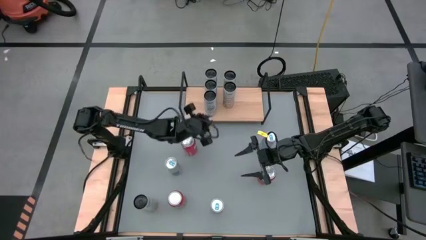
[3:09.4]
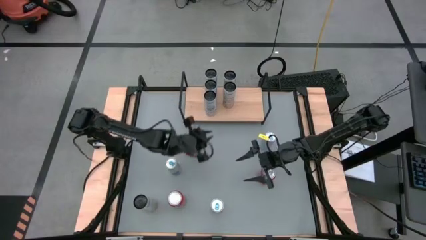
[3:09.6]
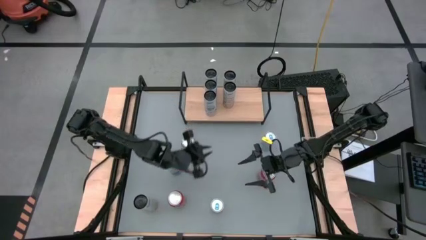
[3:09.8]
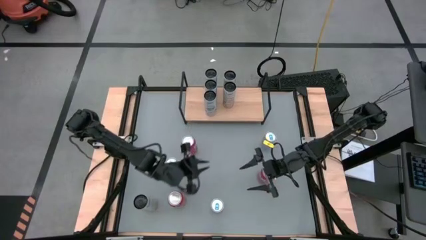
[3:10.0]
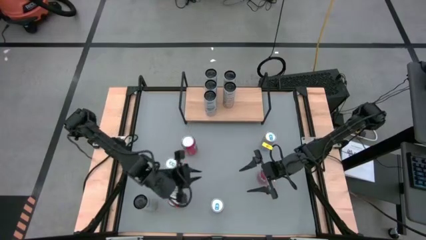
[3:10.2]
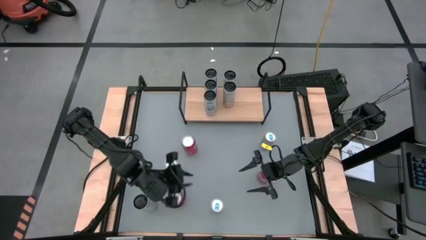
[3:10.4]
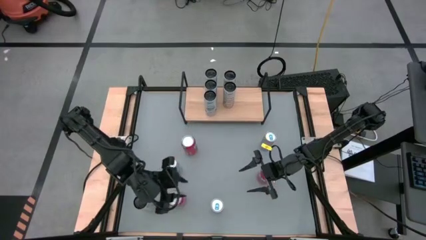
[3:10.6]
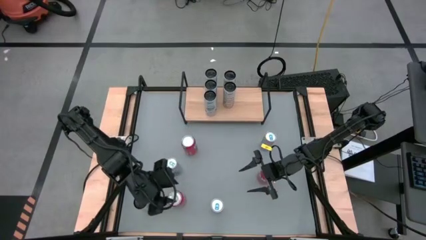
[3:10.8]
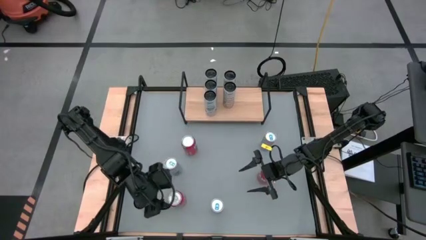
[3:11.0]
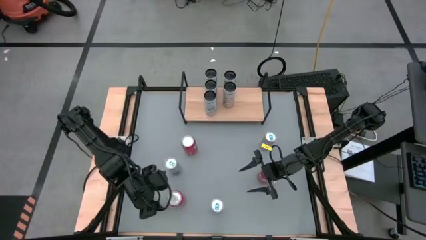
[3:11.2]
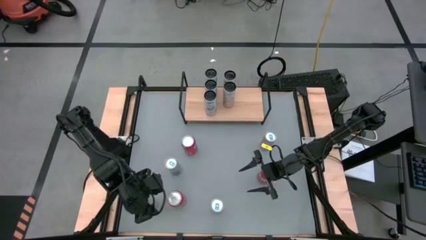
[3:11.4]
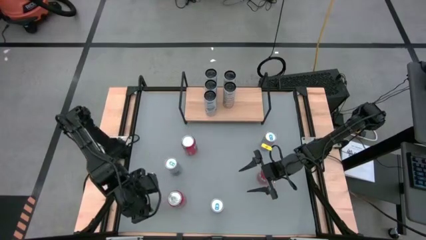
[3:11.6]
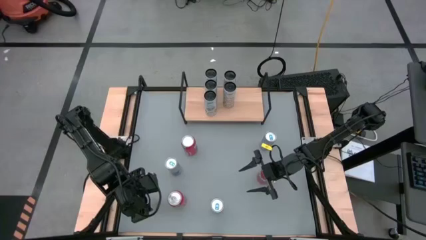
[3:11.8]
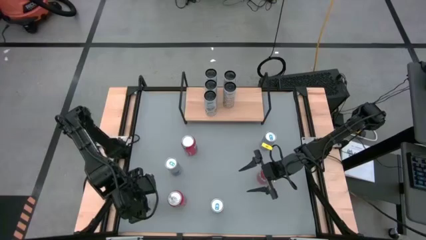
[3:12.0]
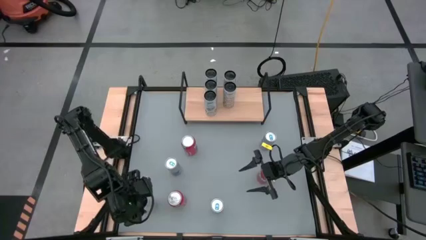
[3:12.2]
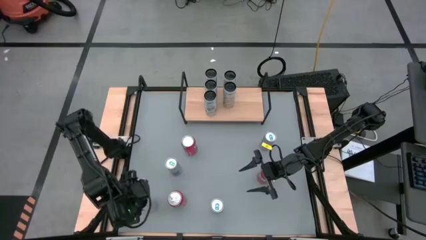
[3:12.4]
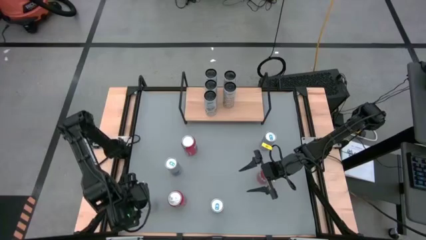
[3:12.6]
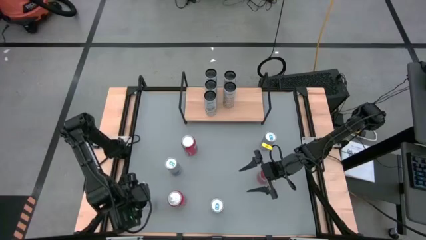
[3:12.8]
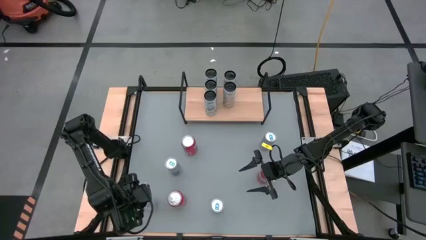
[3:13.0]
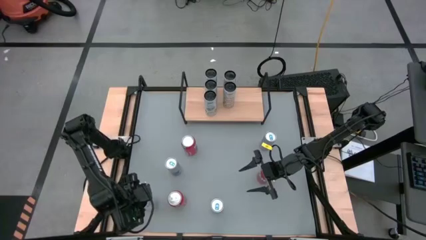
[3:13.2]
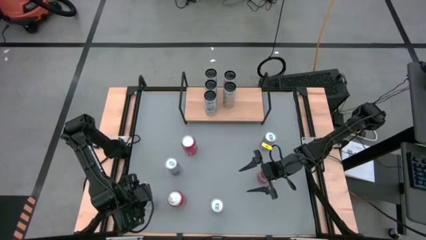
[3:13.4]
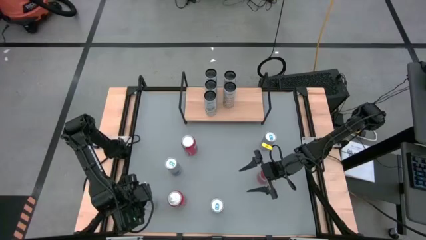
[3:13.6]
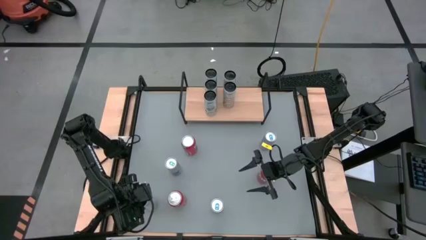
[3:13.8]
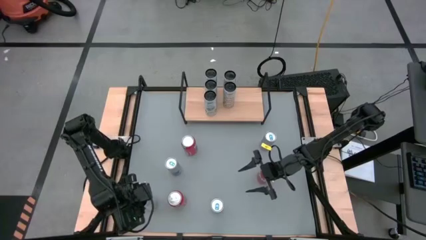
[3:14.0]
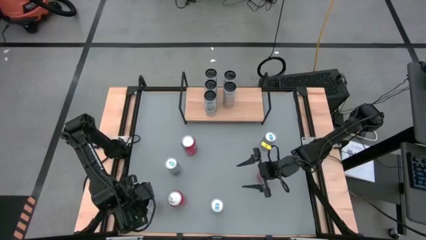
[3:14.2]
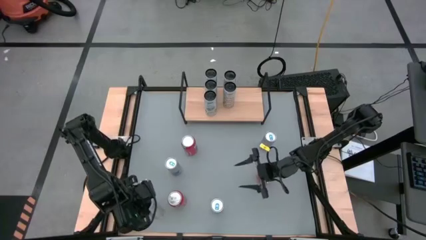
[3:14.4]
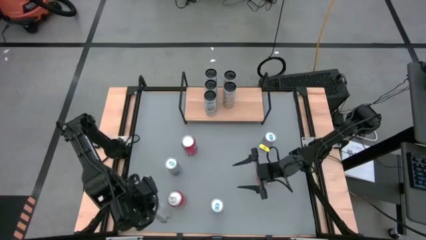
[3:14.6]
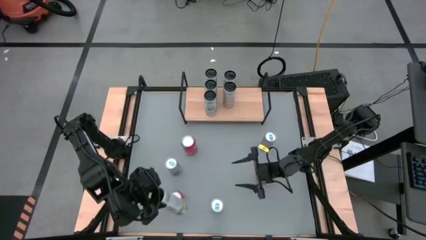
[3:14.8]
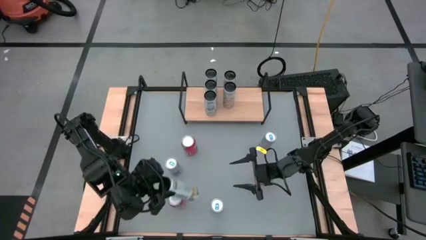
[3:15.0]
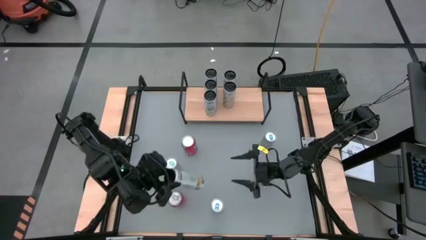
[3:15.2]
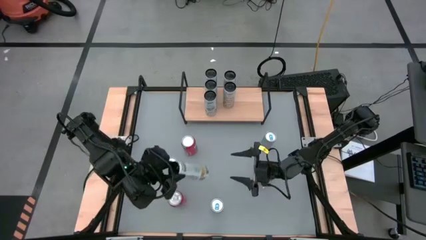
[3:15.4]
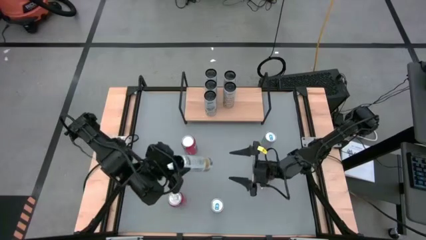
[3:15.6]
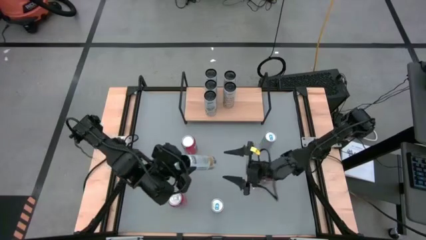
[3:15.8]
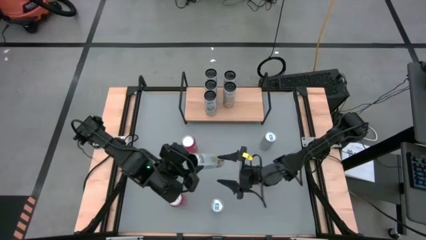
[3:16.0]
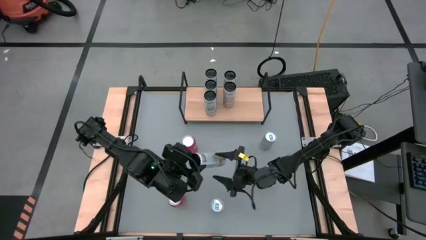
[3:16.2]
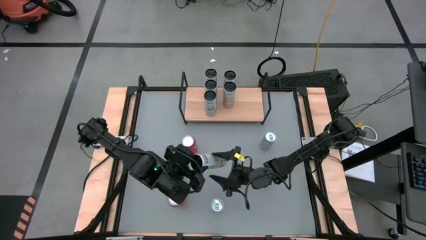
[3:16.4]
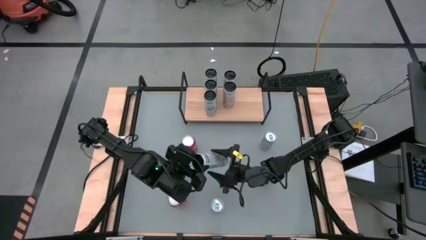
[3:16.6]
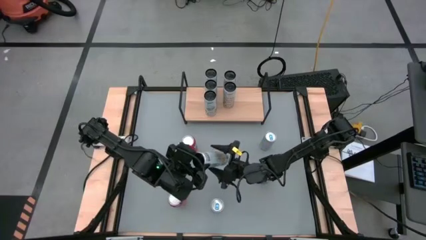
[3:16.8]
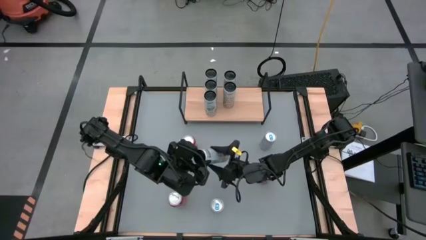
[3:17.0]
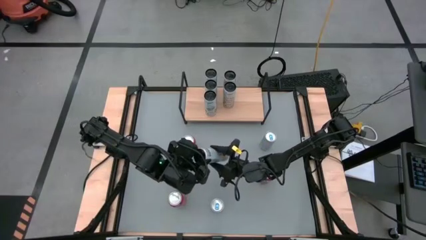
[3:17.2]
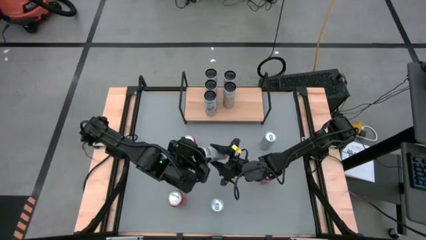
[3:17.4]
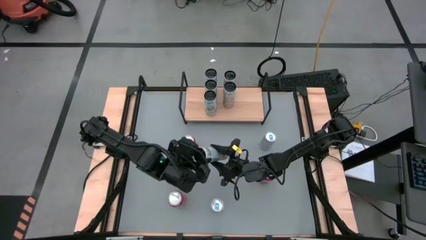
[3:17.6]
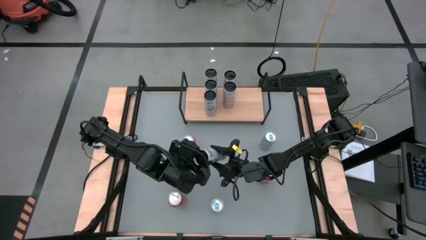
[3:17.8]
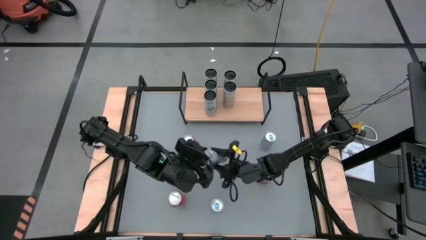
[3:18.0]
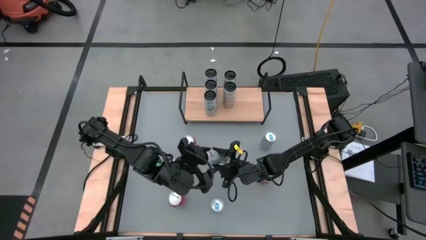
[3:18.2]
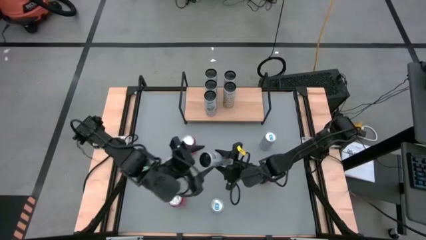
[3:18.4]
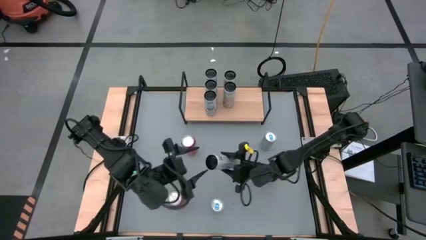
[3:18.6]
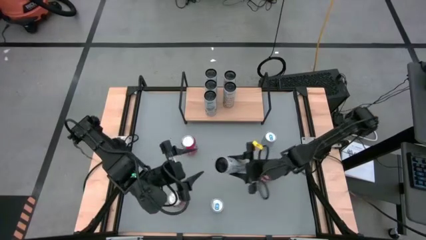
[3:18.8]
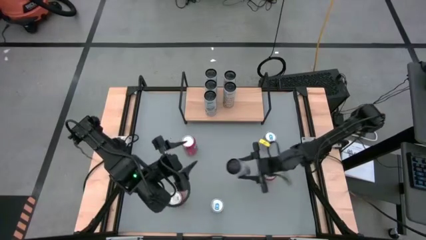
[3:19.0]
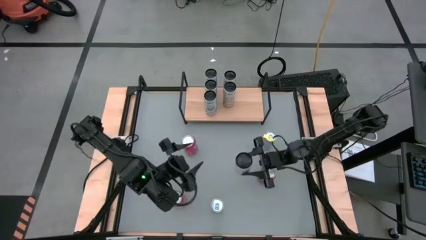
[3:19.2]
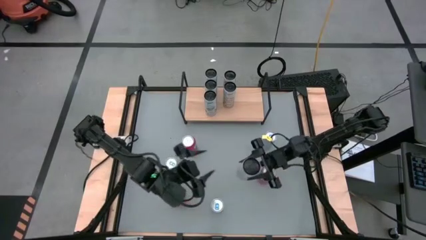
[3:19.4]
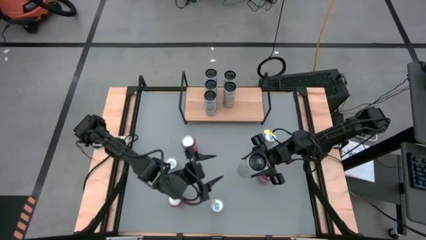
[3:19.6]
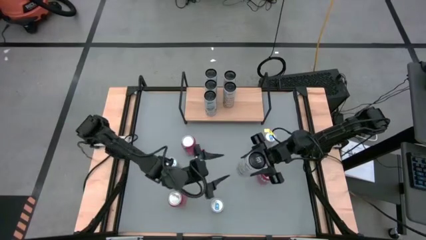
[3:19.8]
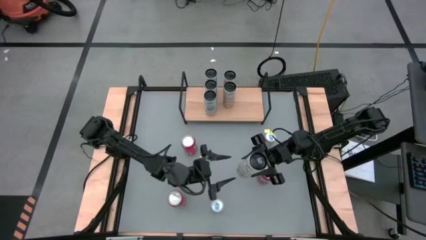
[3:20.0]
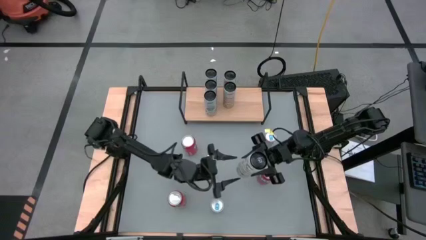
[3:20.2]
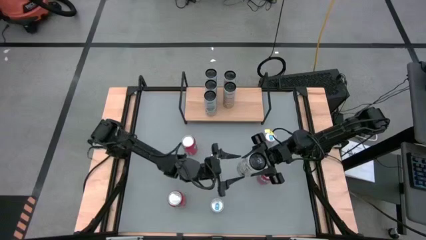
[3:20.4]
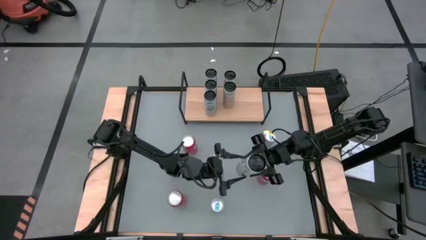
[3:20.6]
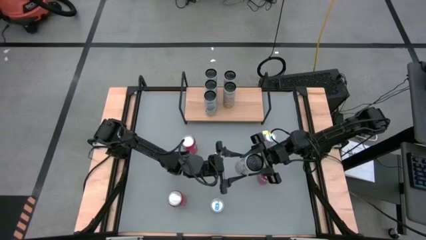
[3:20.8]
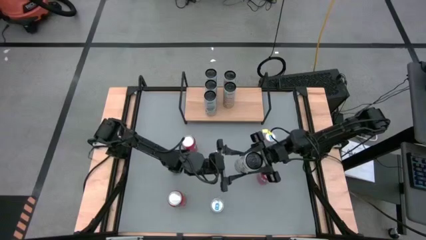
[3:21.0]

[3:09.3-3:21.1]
Task: Place canned beverage on shelf
Put the white yellow soda can aligned with the other white yellow soda cans on the shelf
